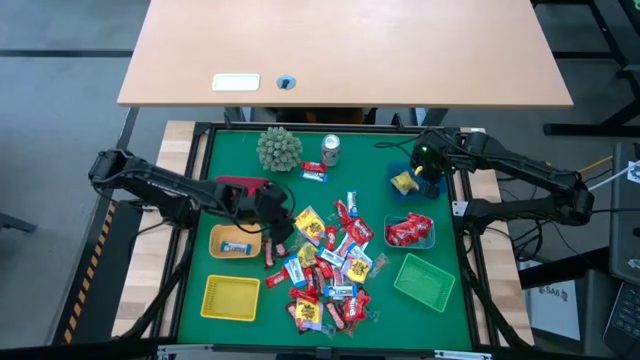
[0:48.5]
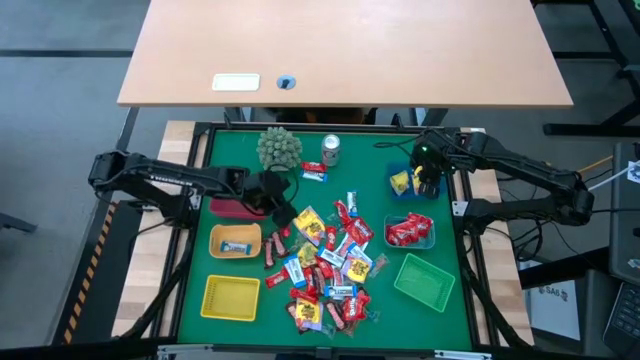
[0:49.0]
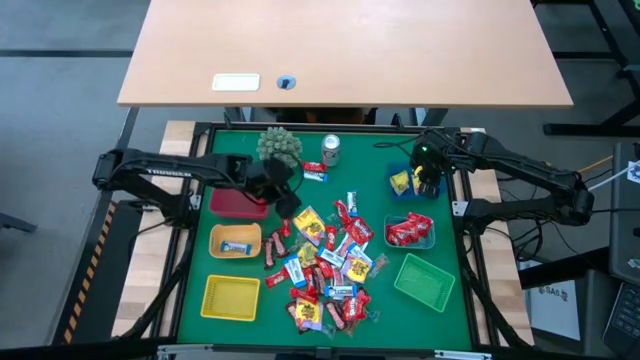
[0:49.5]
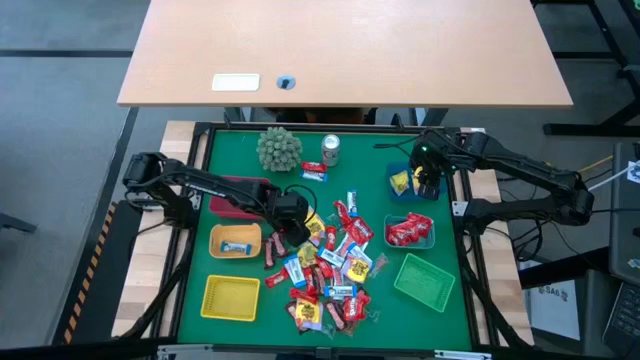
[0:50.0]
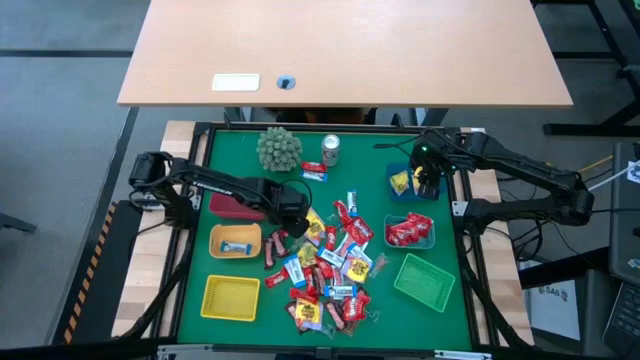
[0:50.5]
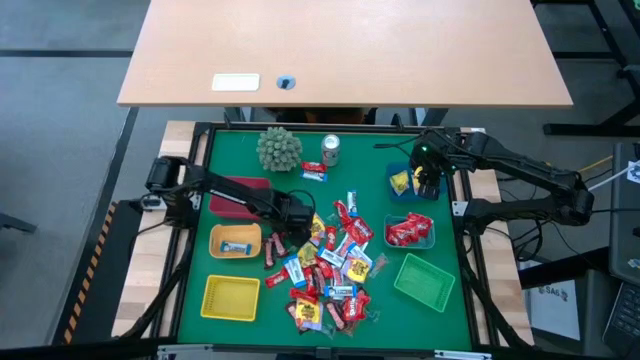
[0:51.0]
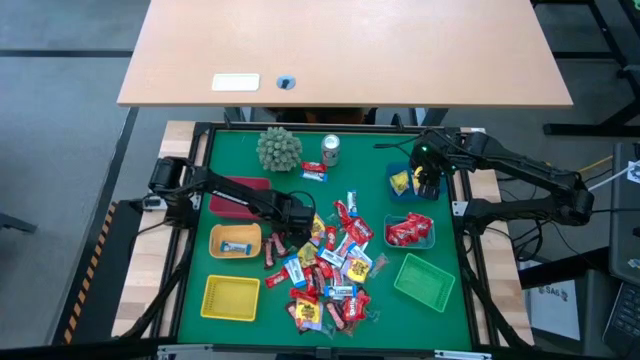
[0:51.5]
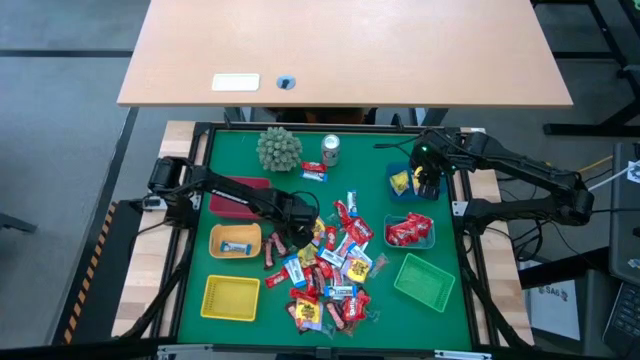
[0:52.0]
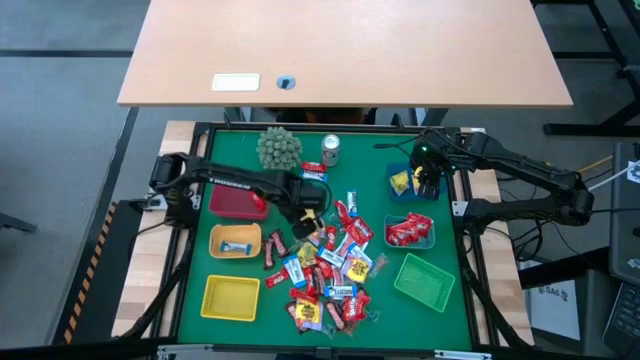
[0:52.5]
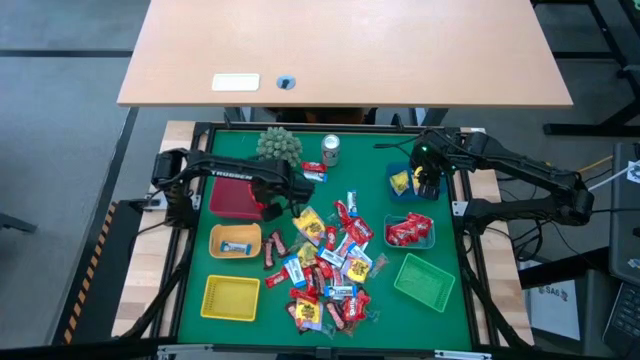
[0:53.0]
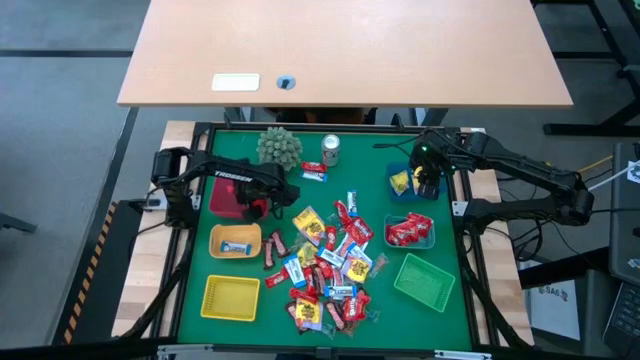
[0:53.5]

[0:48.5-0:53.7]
Task: Sort candy
Put the red chocolate bar into the red bin

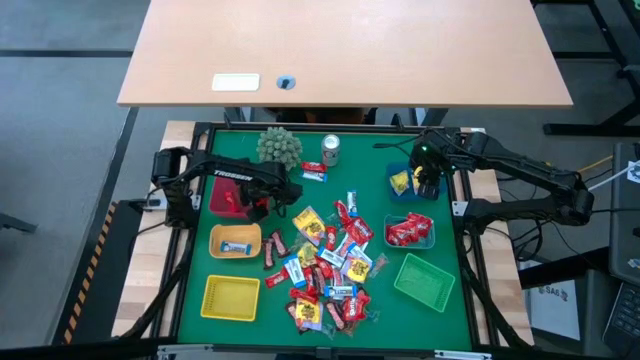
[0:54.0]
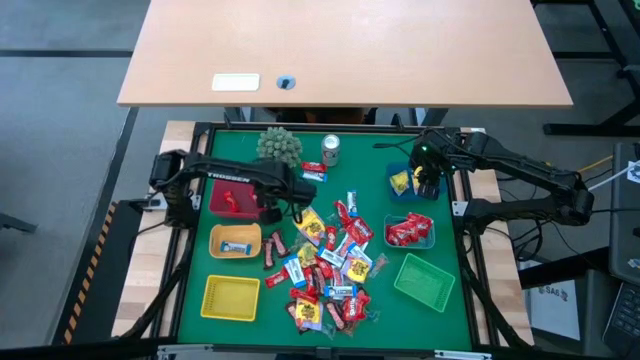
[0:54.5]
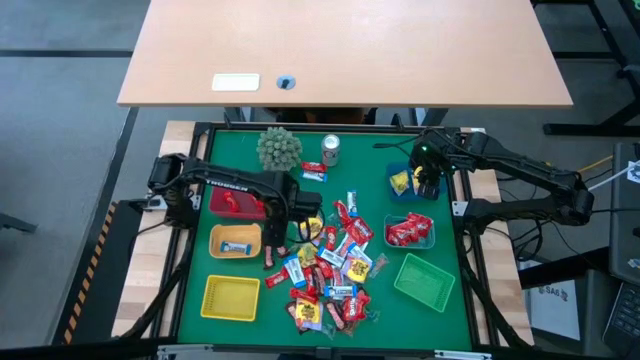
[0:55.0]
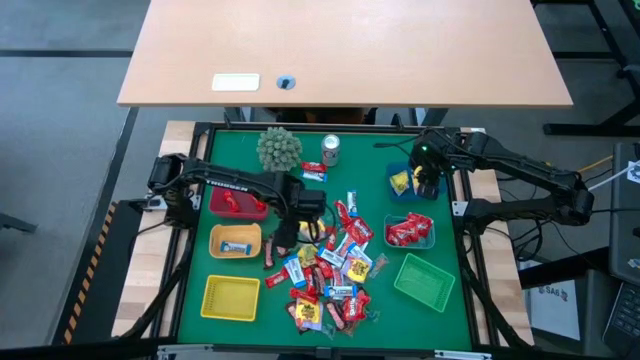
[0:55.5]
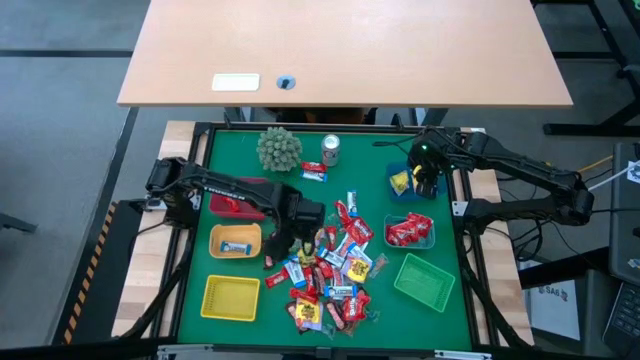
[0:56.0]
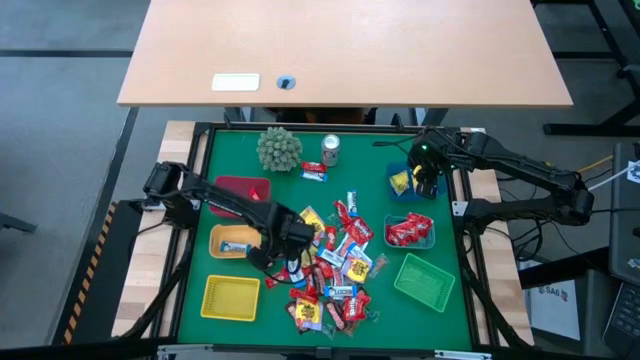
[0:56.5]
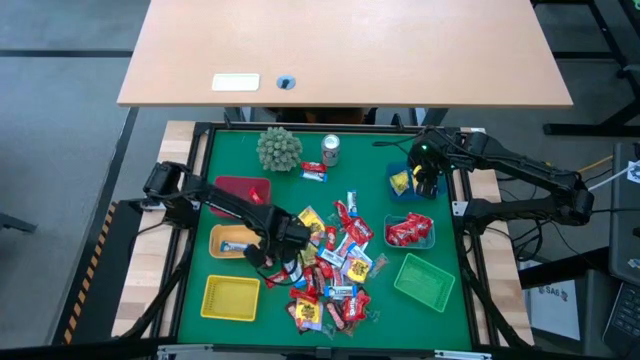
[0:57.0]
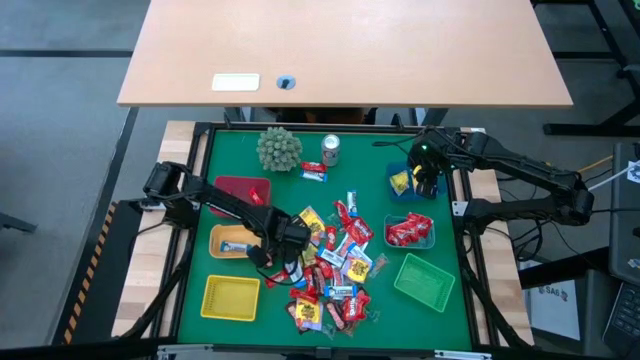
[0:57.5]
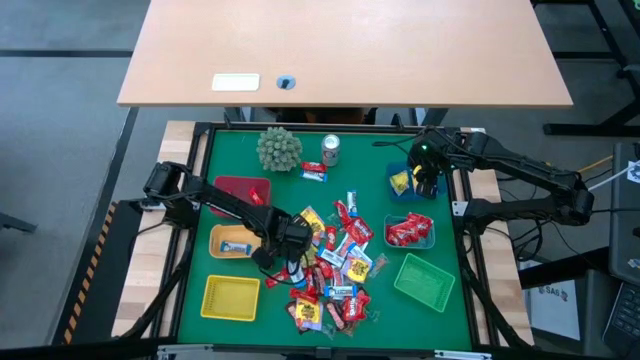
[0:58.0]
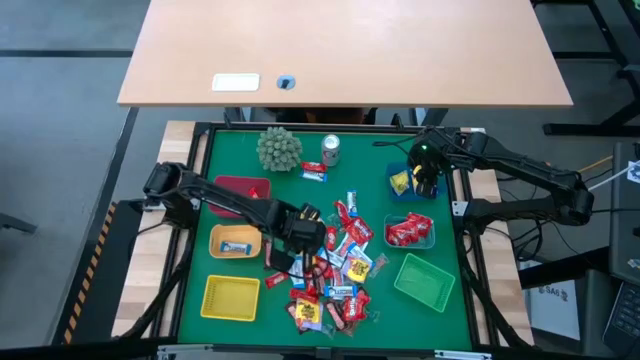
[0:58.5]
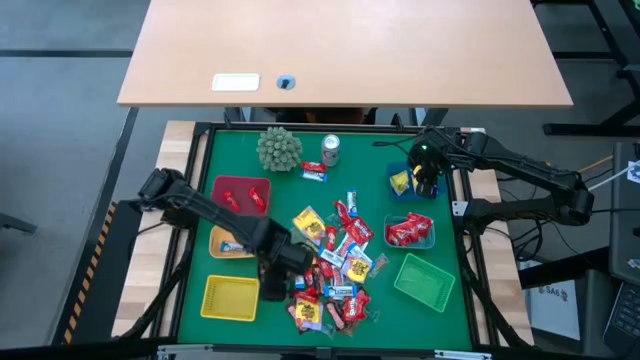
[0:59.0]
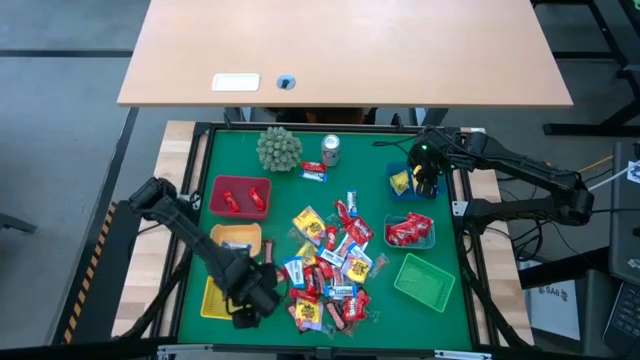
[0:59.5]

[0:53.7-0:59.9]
Put the brown chocolate bar into the yellow bin

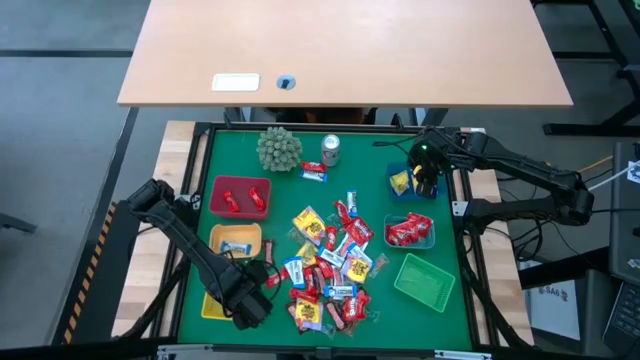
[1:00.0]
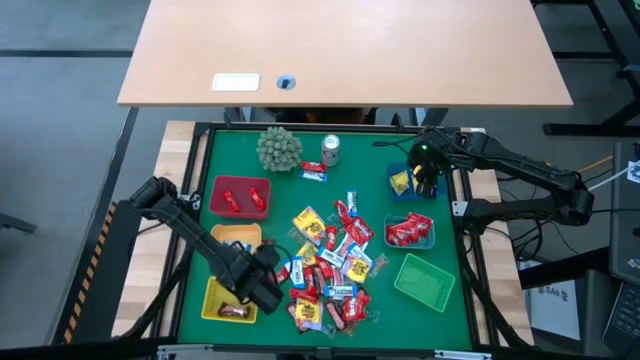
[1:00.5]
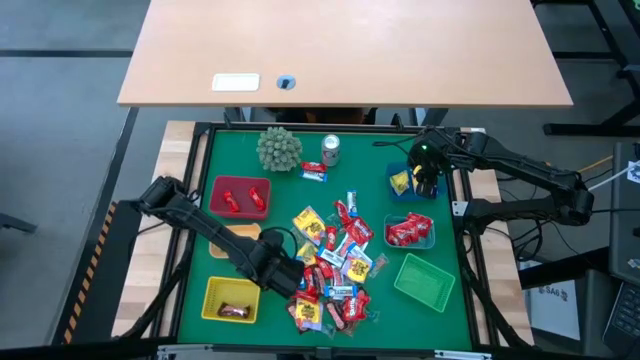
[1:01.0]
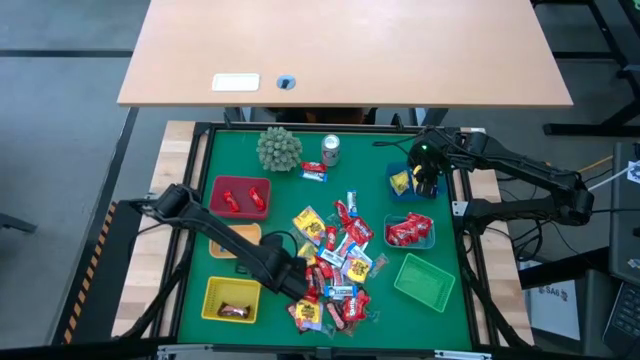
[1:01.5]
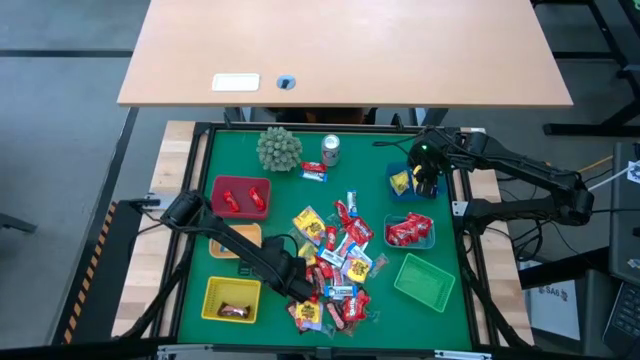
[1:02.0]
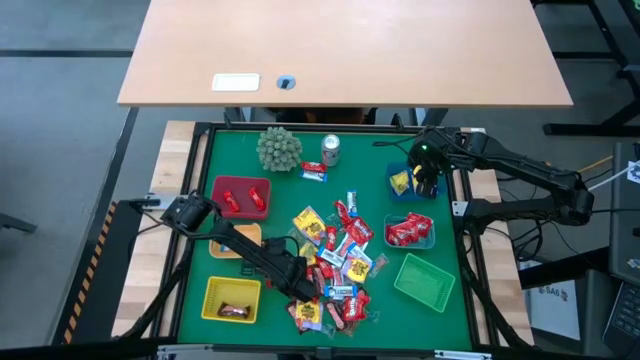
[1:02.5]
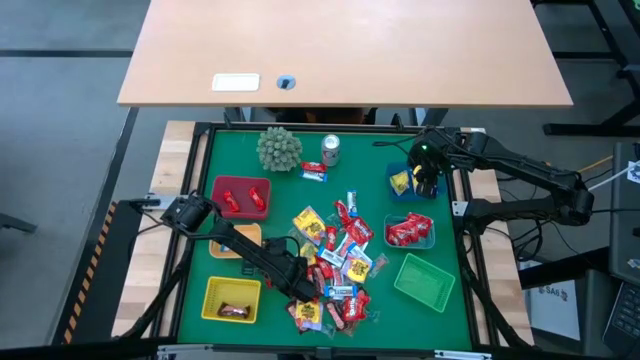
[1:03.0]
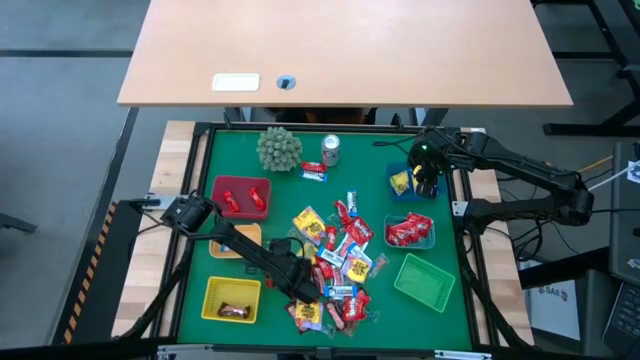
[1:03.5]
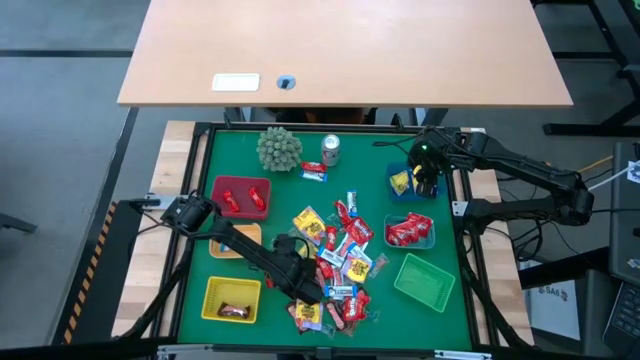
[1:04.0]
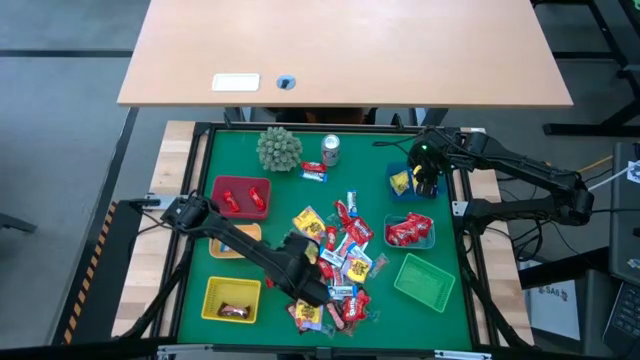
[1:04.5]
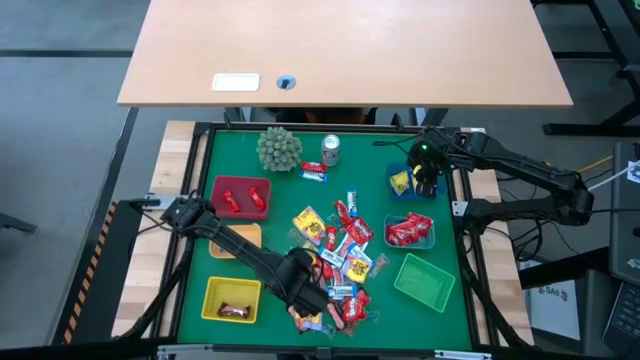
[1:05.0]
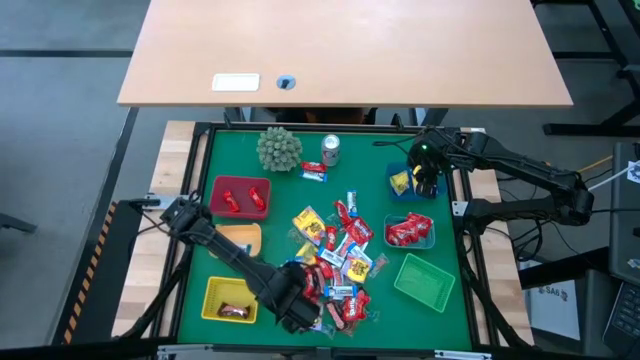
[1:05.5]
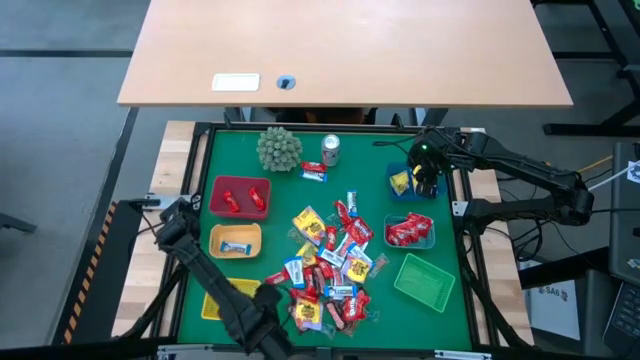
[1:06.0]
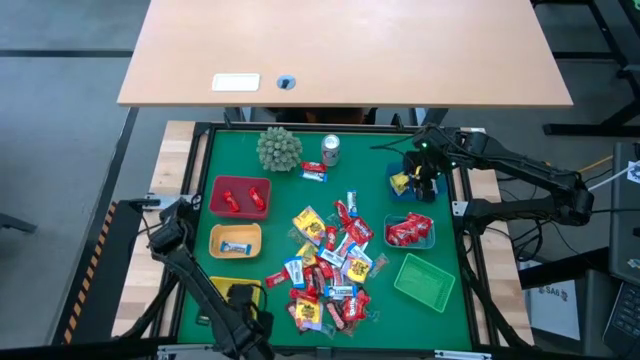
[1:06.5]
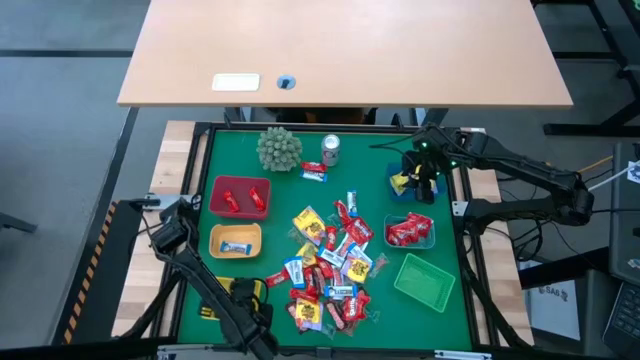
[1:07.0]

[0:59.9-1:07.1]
Put the brown chocolate bar into the yellow bin
